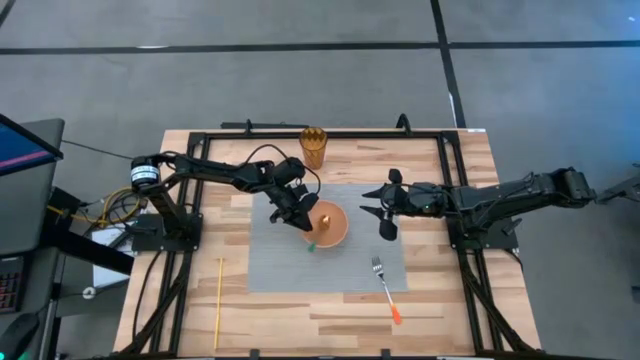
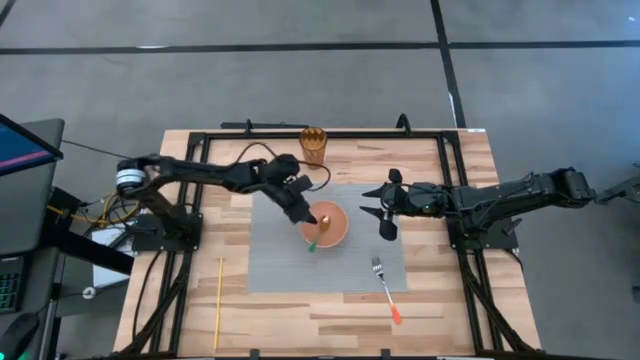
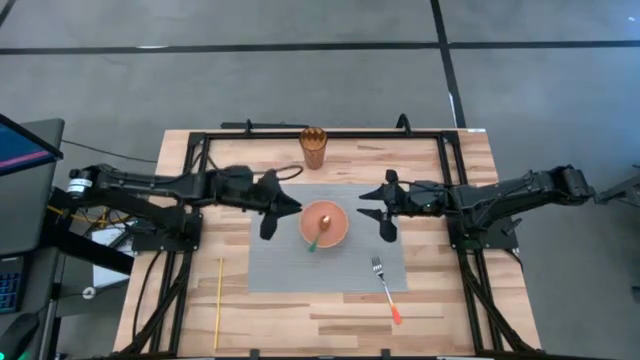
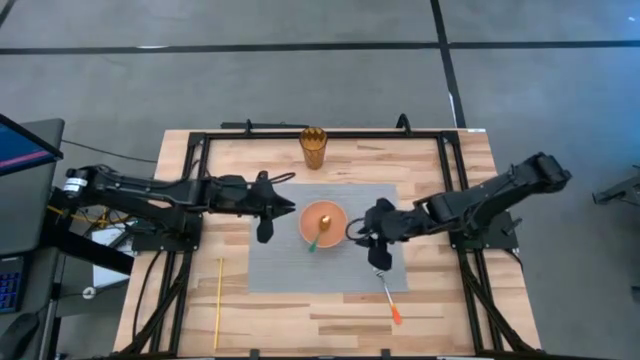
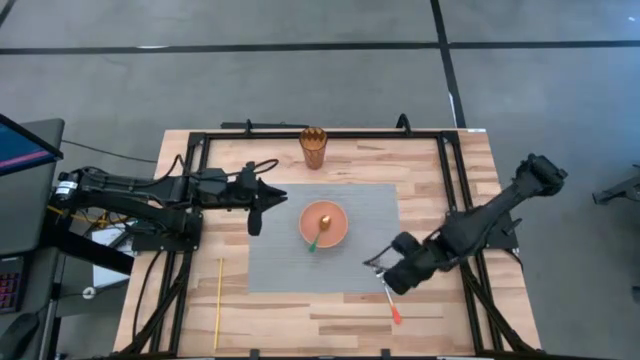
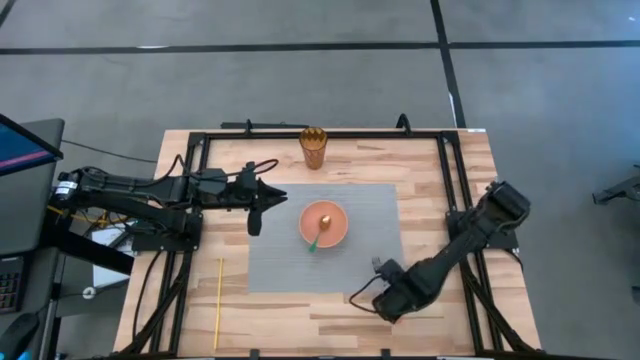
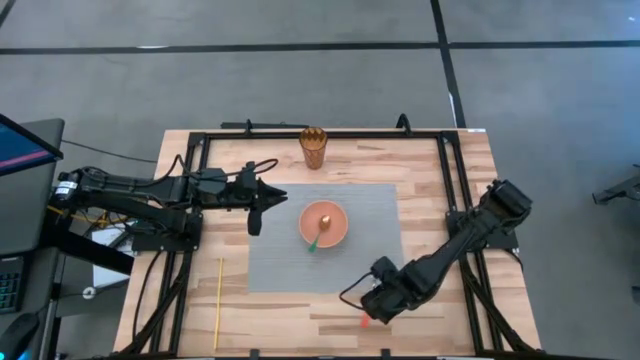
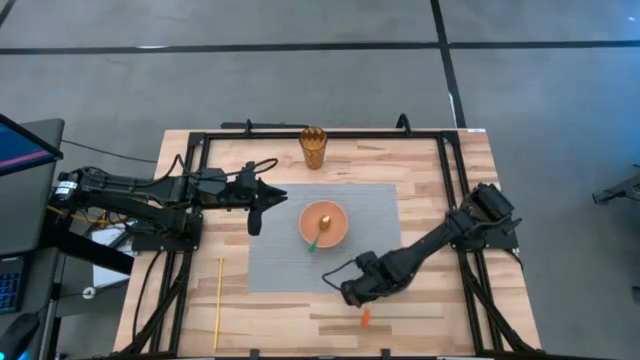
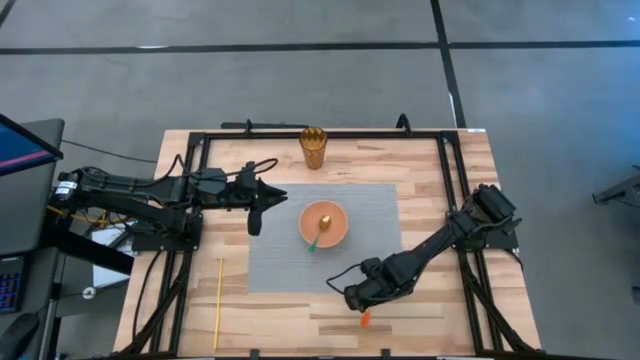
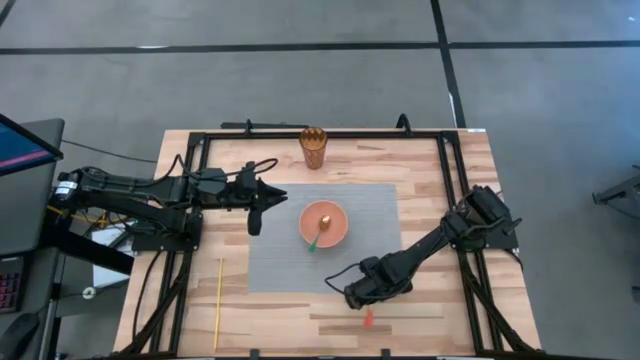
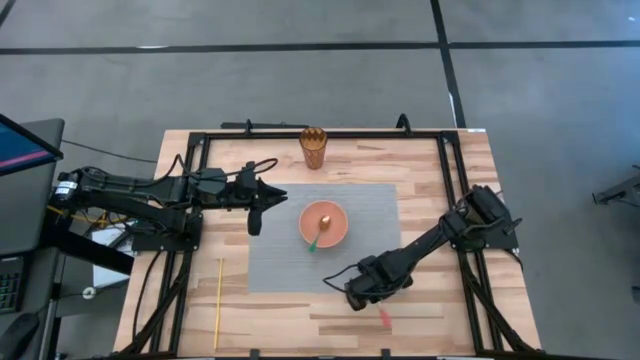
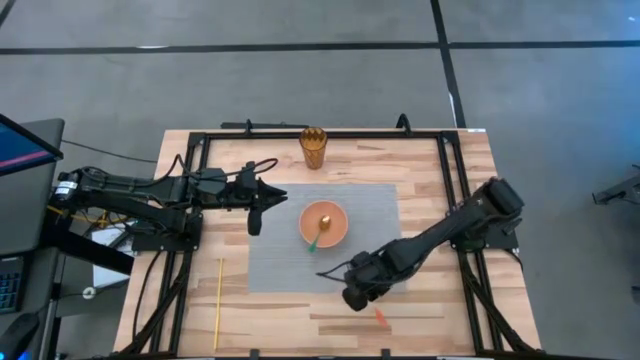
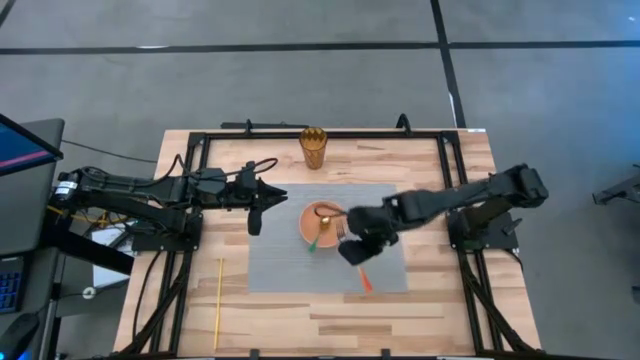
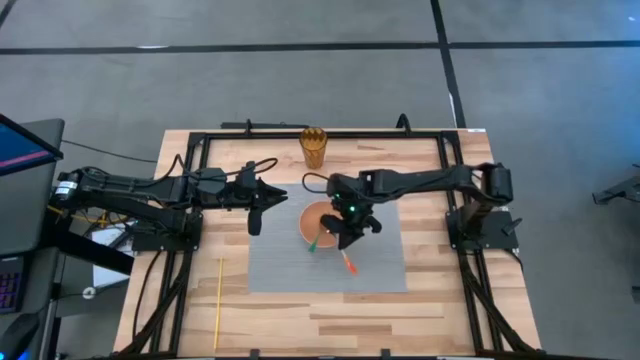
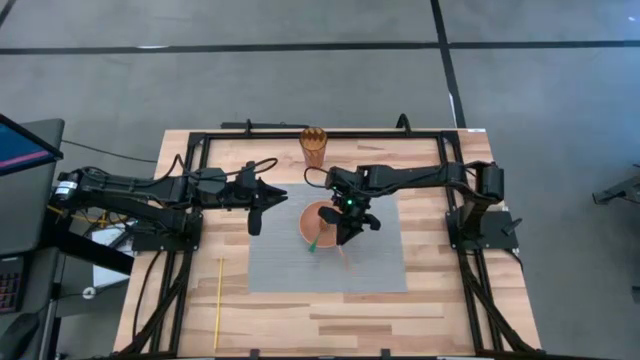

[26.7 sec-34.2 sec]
Task: Pick & Place Utensil
Put the orange fork into the orange bowl on the gray mat

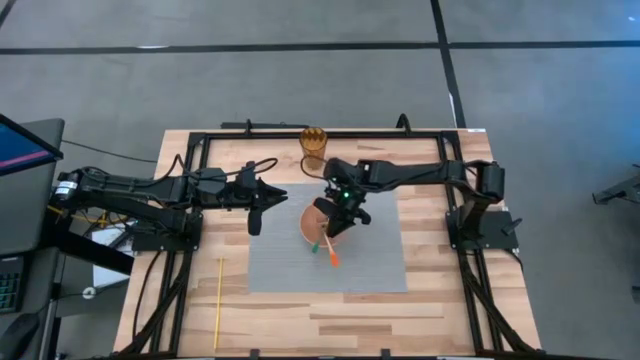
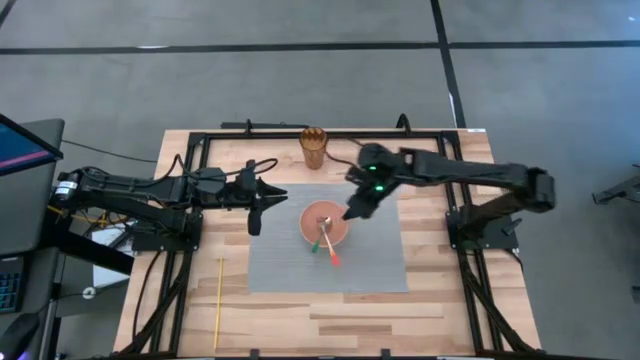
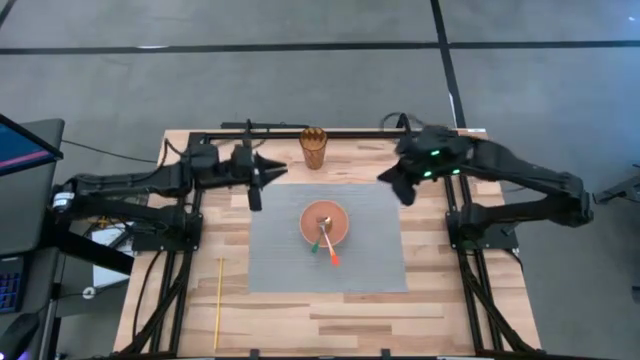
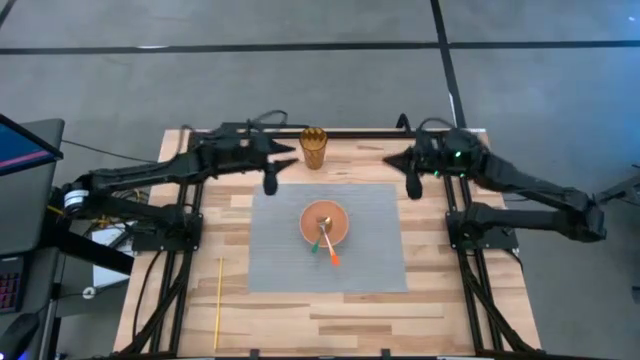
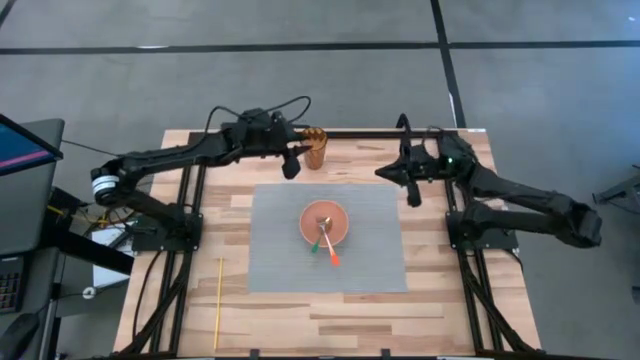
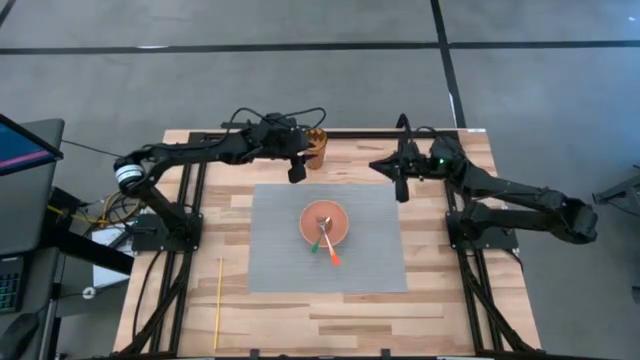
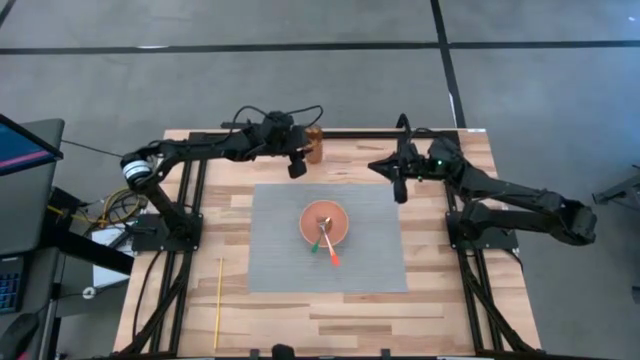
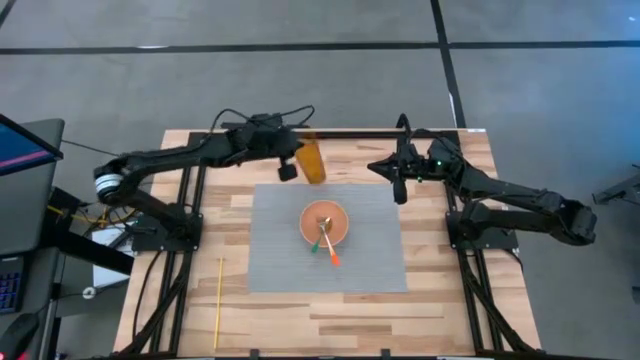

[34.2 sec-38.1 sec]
Put the brown cup to the top left of the orange bowl on the gray mat

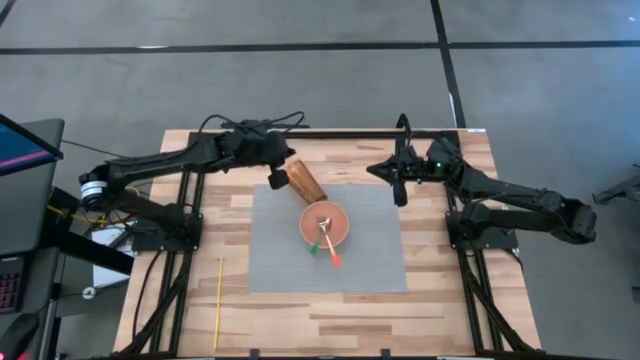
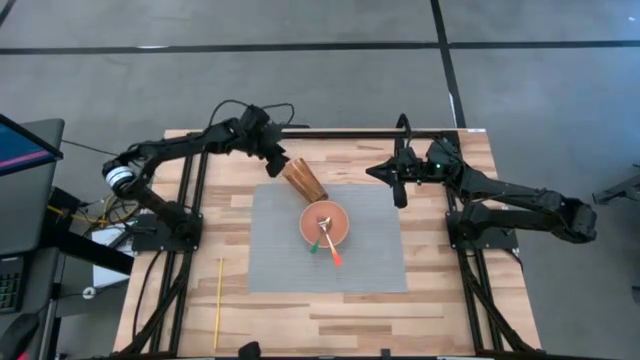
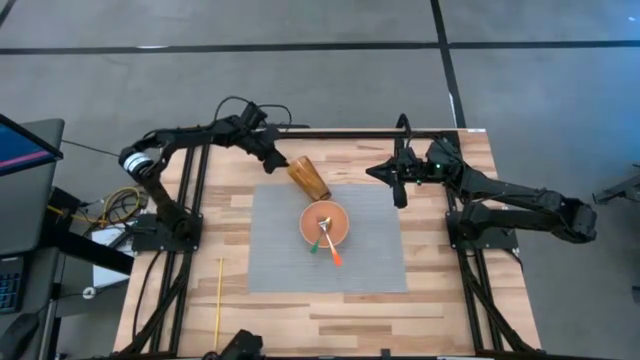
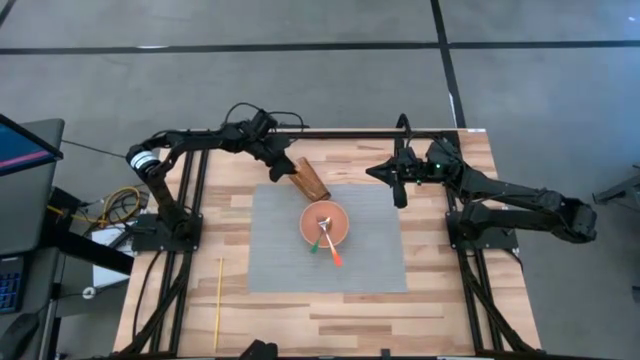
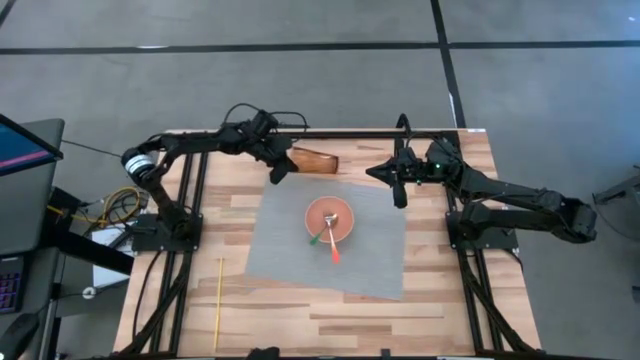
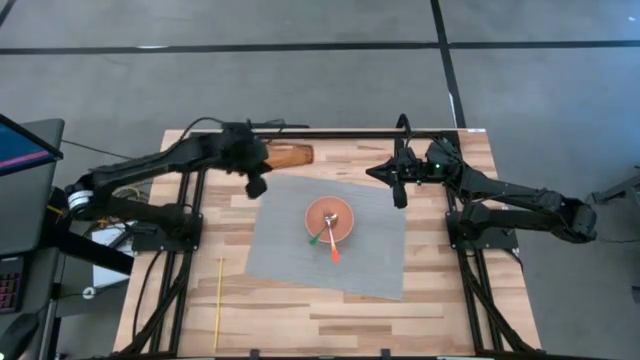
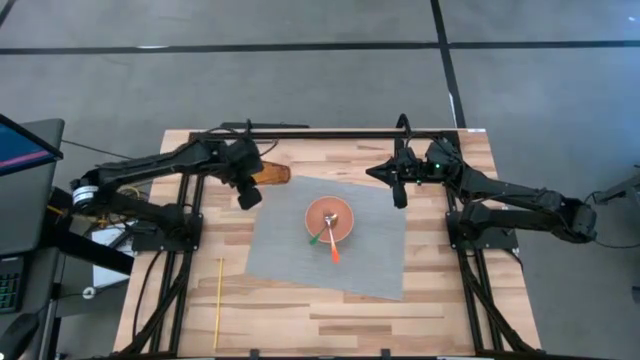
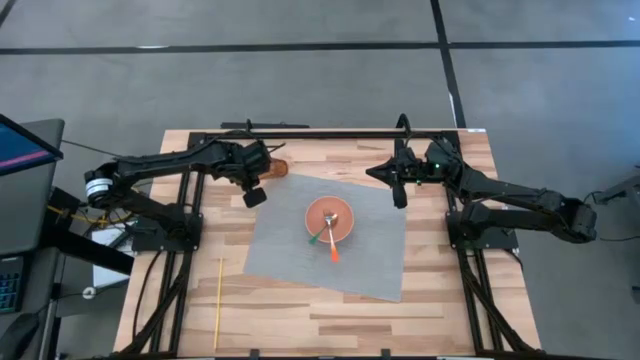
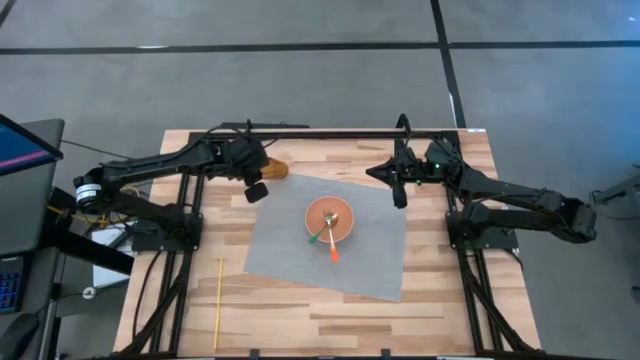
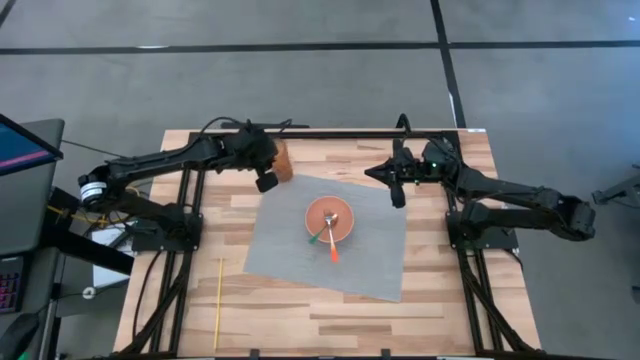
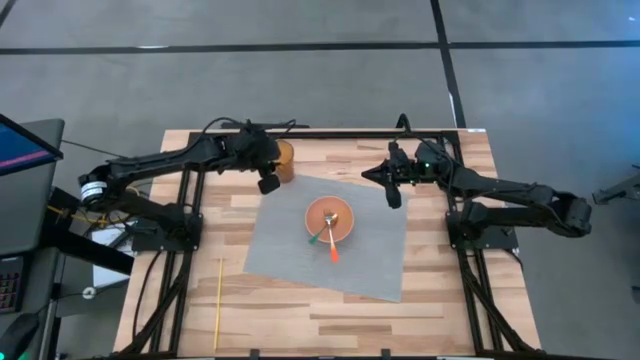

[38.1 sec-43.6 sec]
Put the brown cup to the top left of the orange bowl on the gray mat

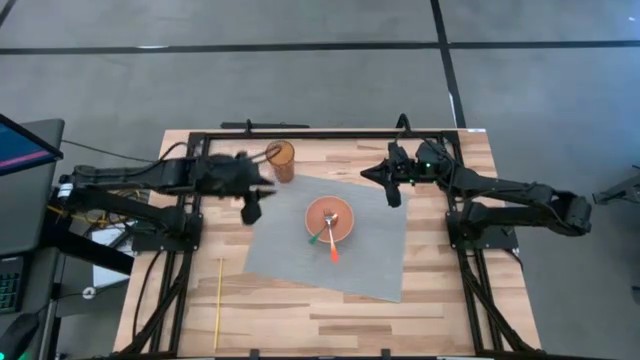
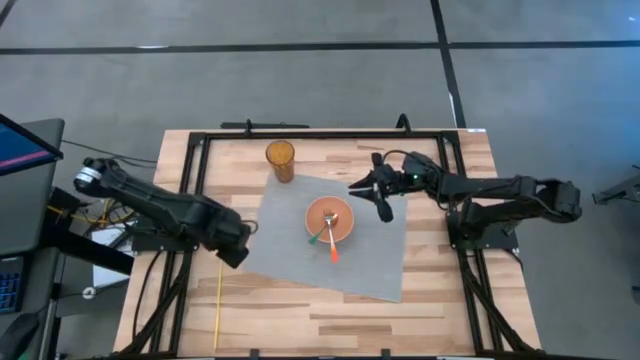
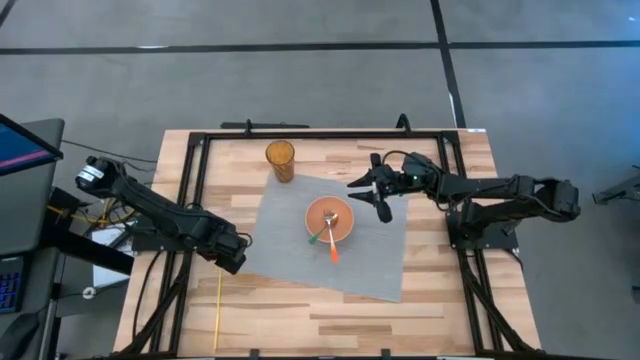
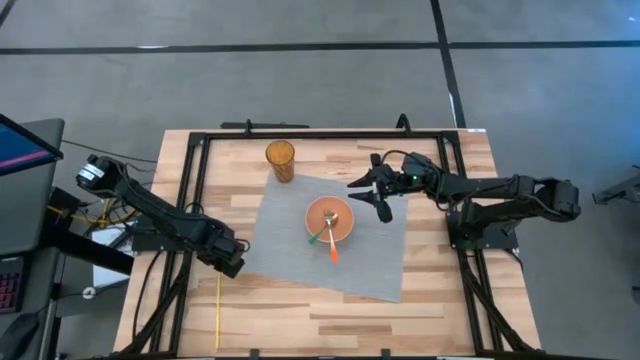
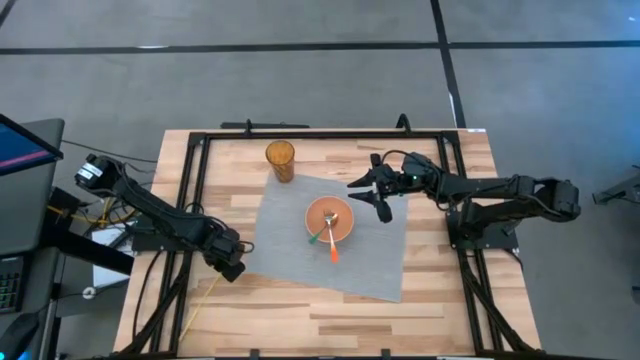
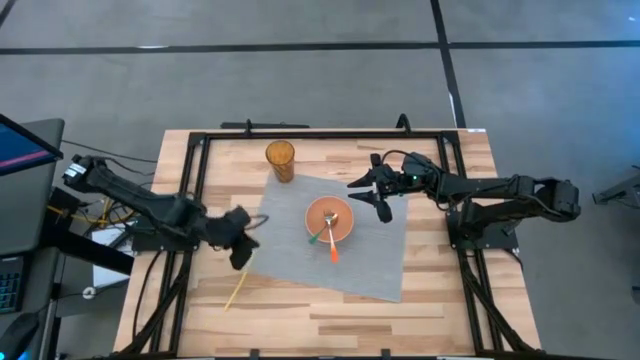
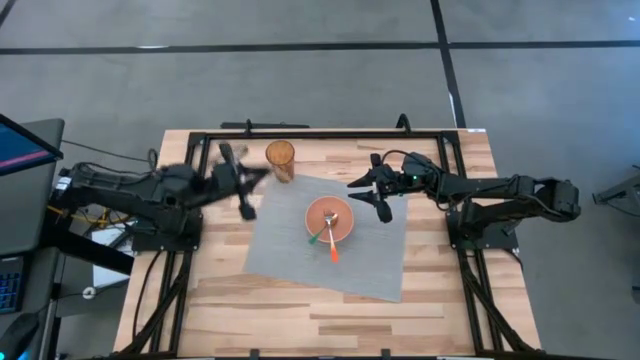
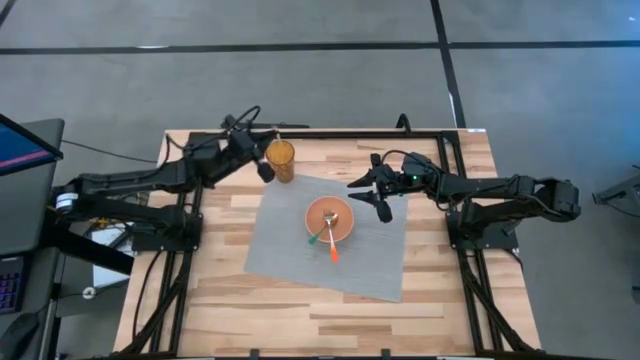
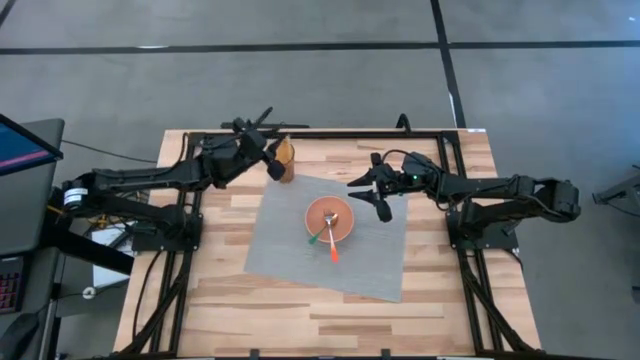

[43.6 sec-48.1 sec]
Put the yellow straw into the brown cup on the gray mat
